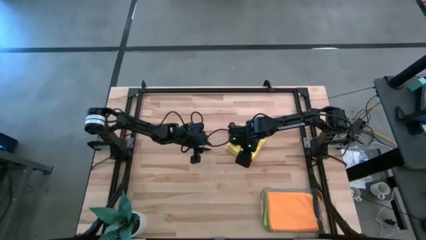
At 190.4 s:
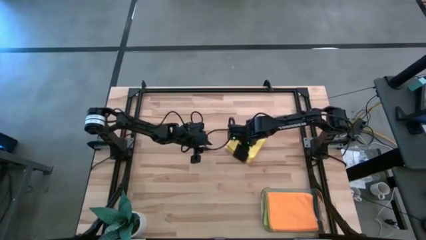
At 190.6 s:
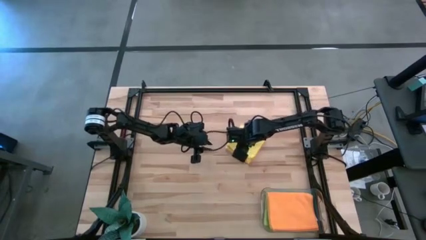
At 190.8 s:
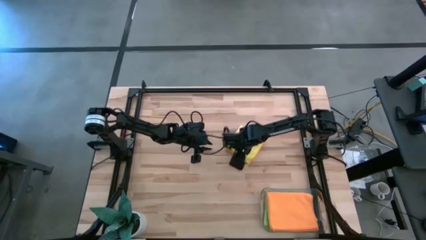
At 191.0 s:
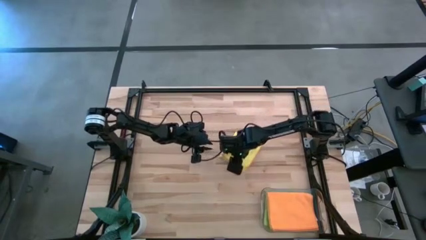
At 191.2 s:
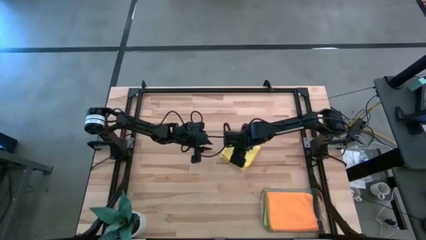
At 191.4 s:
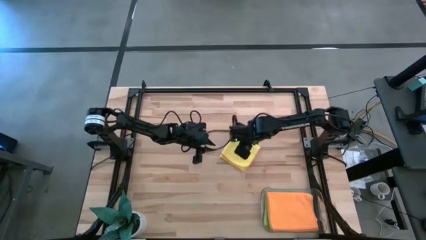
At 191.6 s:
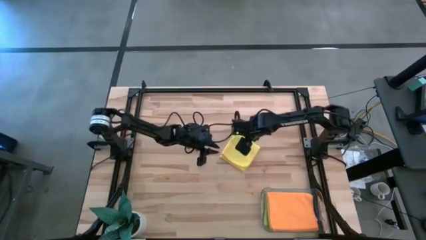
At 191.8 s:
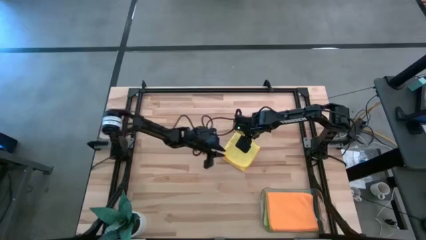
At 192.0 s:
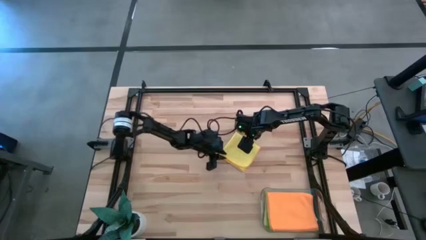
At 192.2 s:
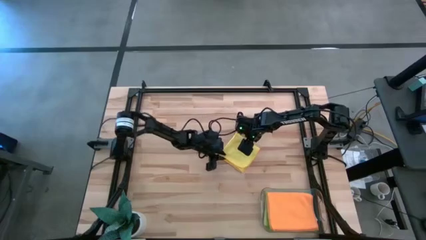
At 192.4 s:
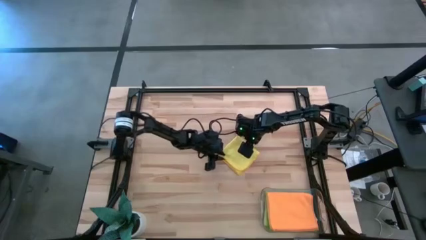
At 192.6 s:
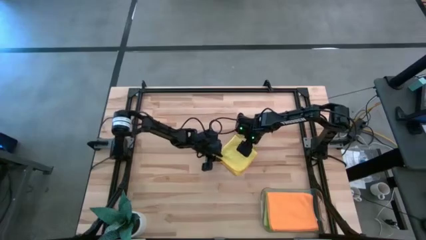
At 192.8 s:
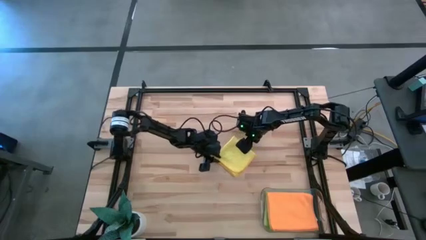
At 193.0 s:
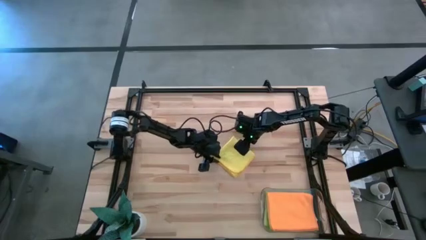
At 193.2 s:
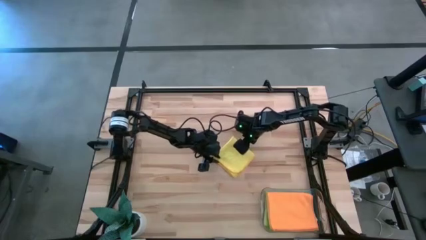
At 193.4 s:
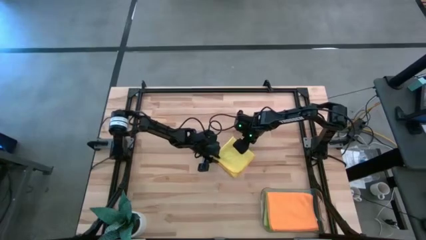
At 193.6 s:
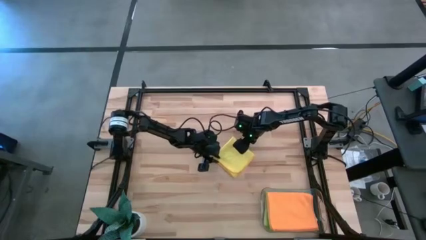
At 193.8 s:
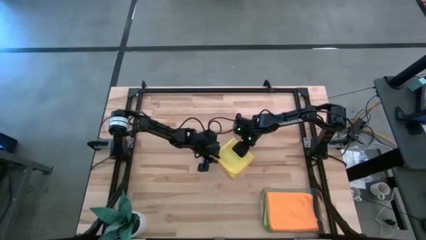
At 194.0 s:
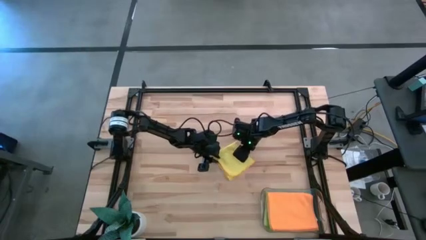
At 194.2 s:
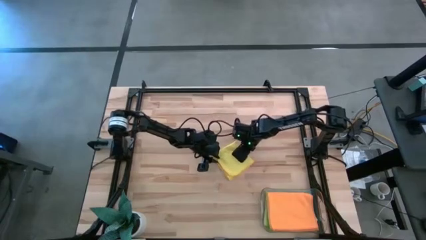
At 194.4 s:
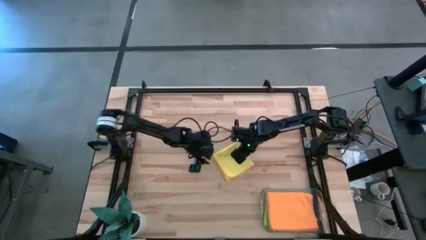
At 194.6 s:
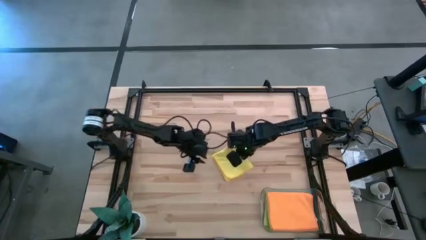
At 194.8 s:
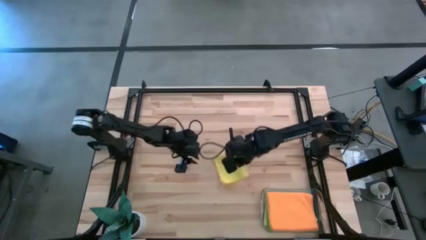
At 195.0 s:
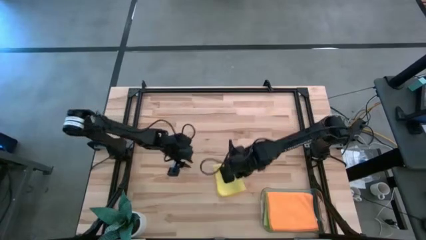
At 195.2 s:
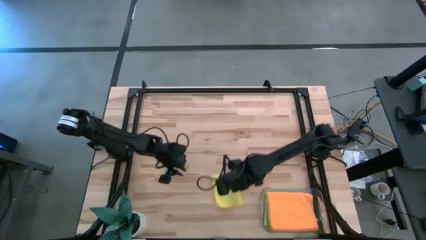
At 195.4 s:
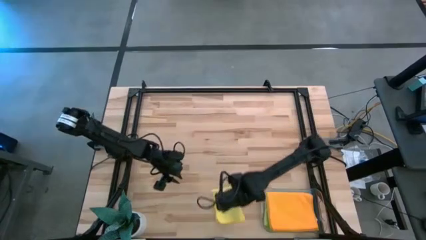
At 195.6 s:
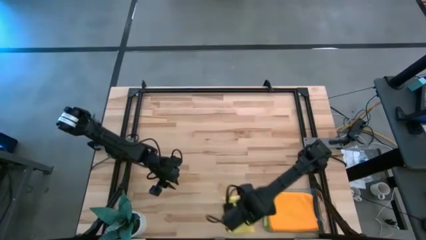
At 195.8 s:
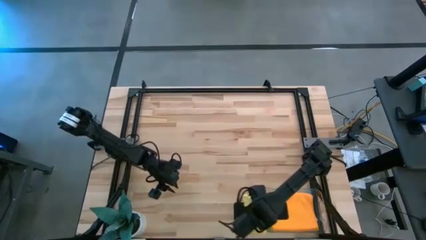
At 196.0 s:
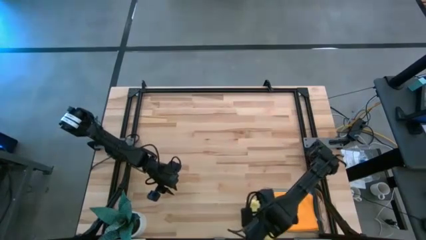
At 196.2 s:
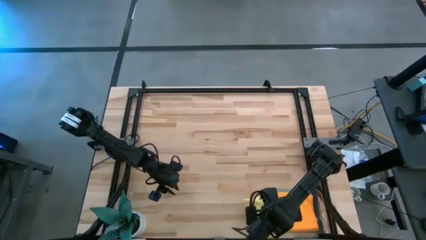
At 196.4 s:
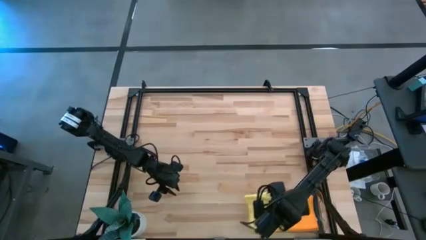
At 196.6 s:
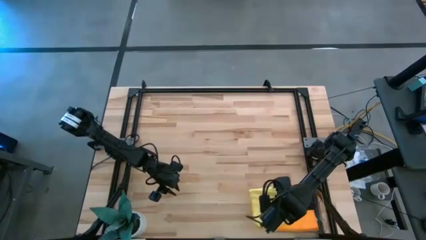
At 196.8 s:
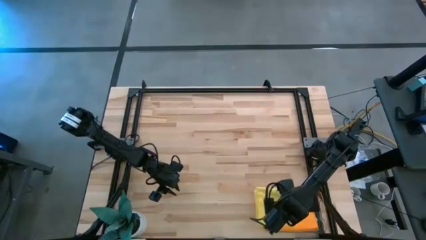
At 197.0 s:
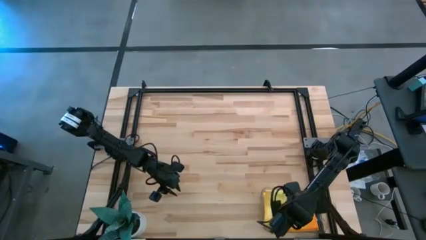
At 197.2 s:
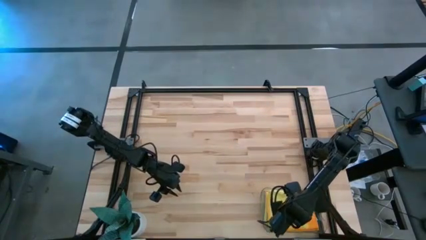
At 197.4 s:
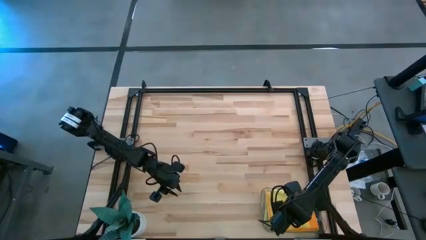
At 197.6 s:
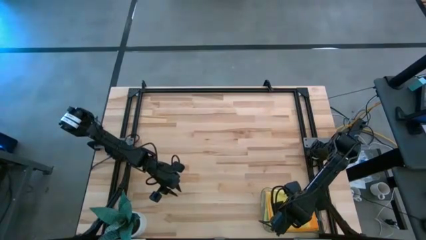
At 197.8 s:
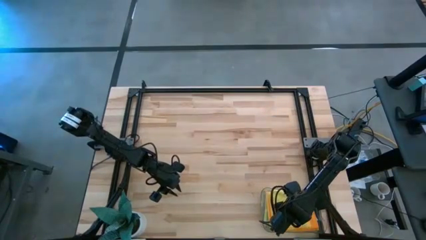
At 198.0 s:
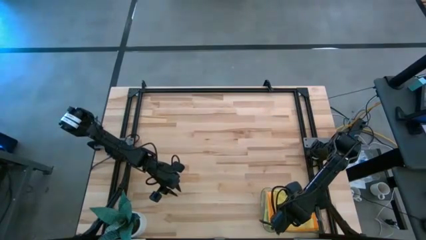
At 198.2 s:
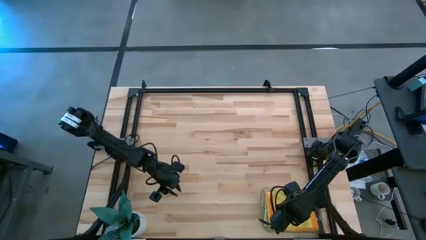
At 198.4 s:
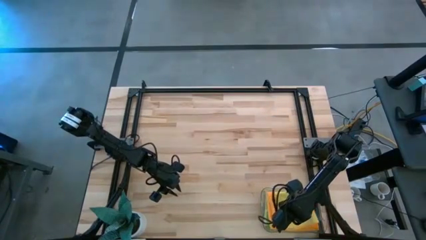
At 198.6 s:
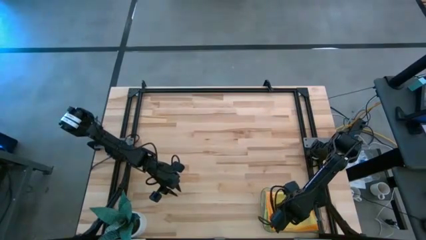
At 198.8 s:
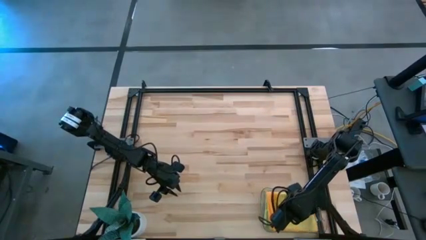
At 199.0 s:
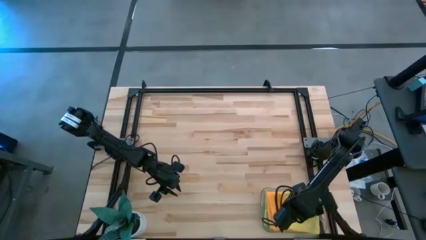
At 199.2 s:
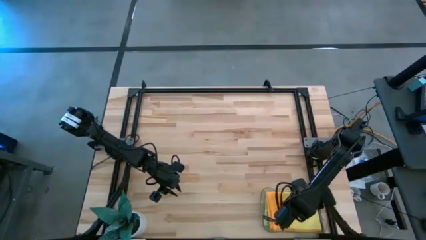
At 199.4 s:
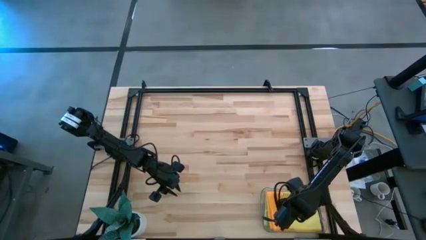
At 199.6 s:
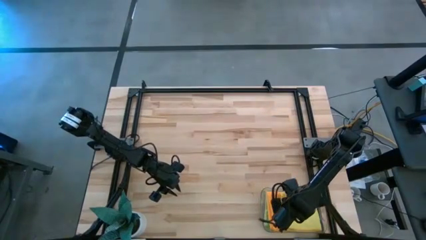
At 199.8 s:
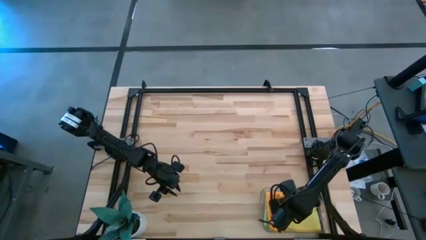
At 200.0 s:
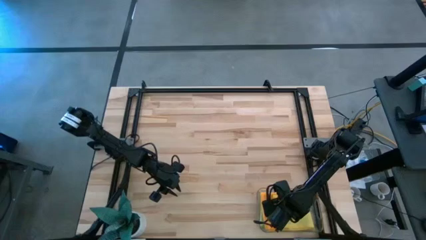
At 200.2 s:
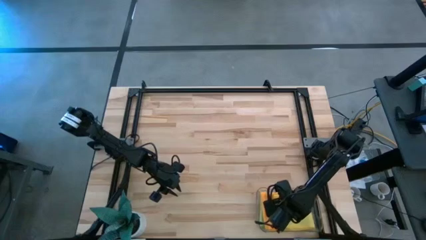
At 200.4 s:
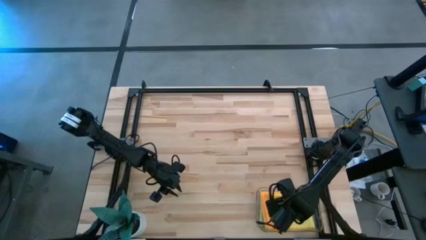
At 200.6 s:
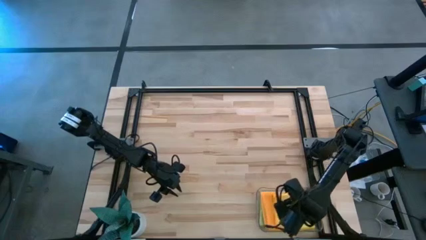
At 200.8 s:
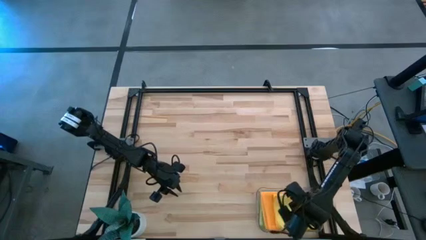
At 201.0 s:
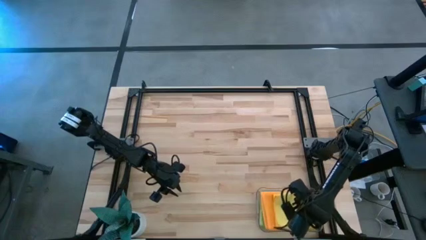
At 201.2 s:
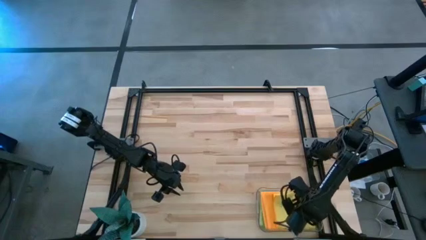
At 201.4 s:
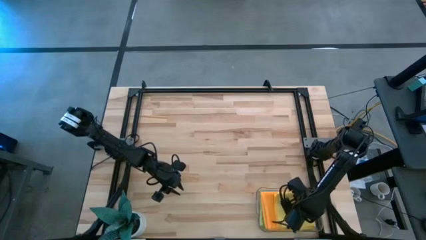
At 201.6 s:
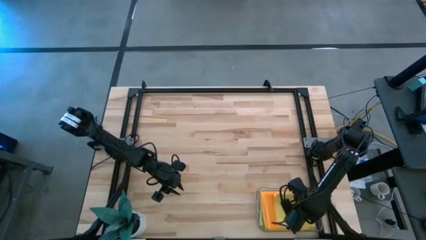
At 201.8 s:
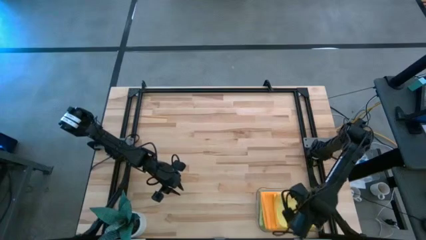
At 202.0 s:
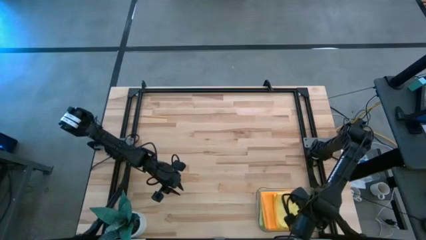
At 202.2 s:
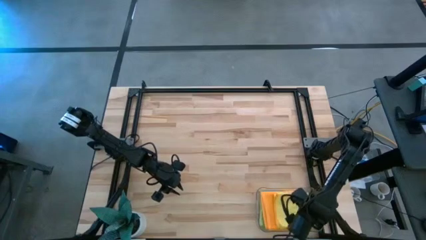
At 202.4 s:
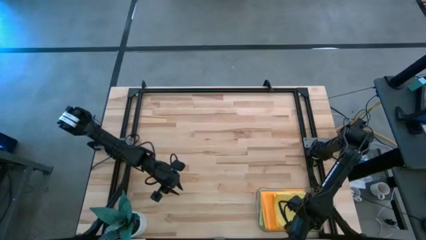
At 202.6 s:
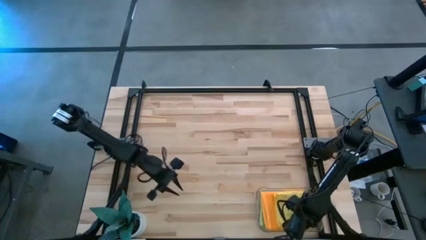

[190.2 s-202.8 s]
Task: Fold microfiber towels
Put the yellow microfiber towel into the transparent bin
